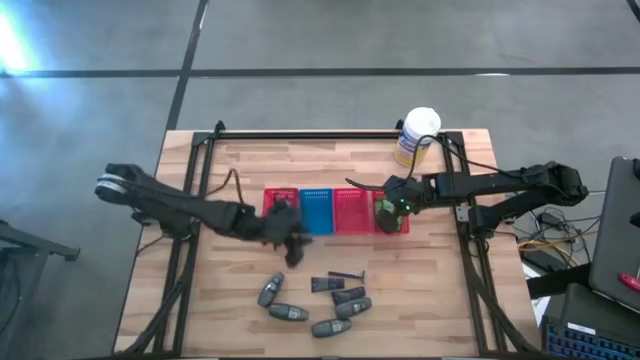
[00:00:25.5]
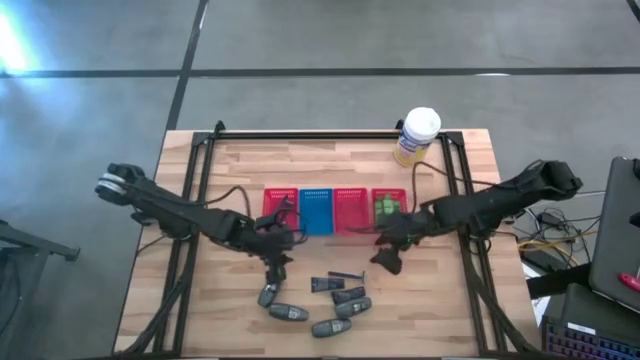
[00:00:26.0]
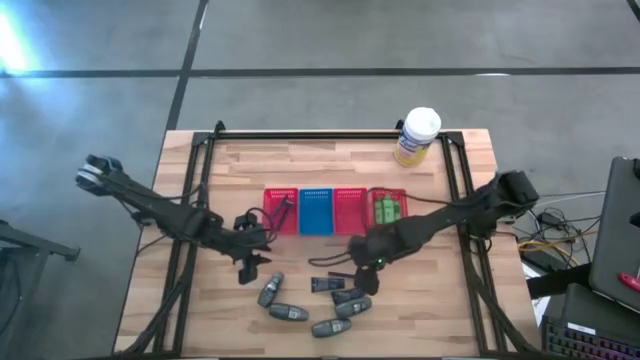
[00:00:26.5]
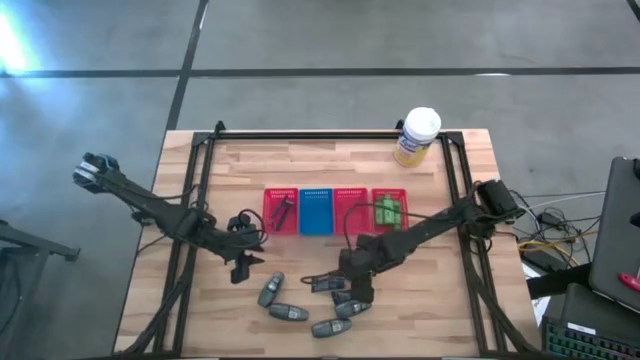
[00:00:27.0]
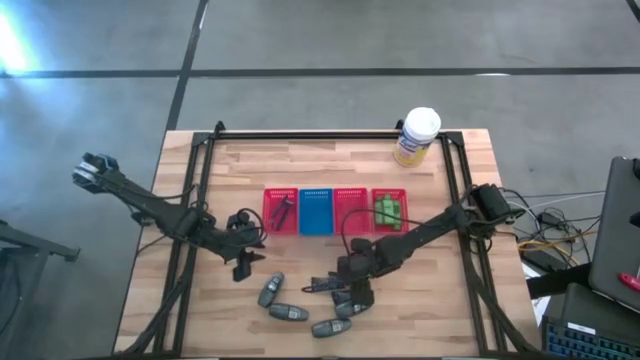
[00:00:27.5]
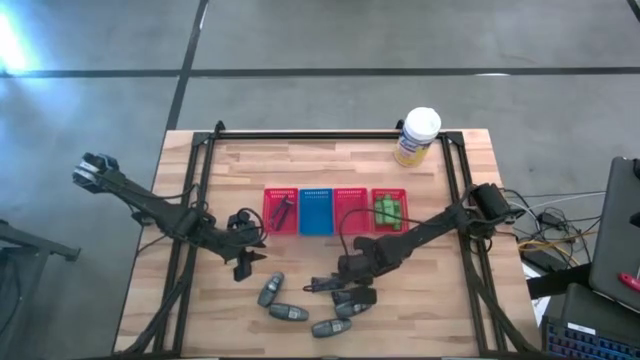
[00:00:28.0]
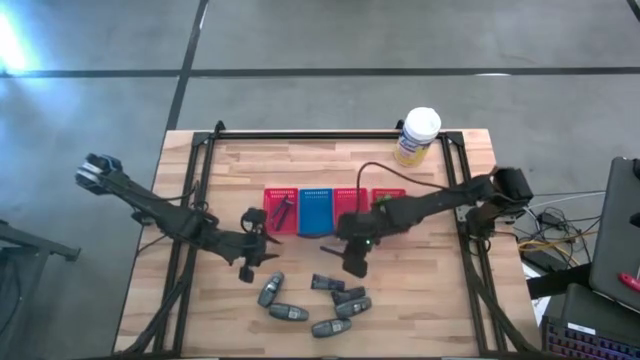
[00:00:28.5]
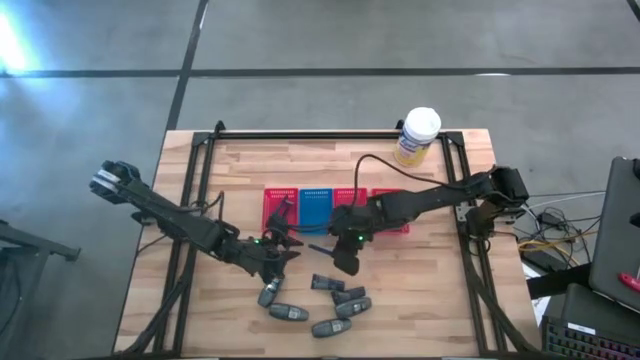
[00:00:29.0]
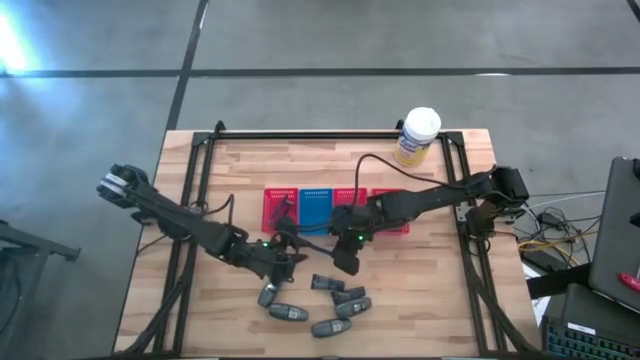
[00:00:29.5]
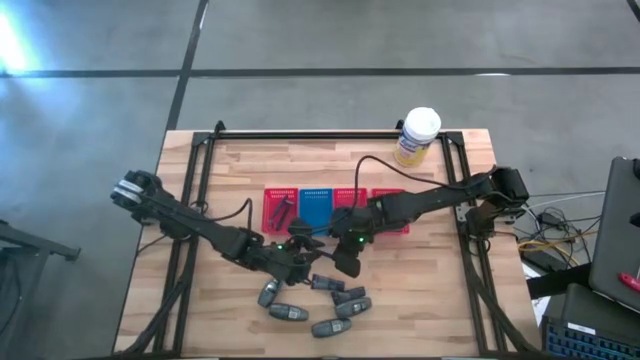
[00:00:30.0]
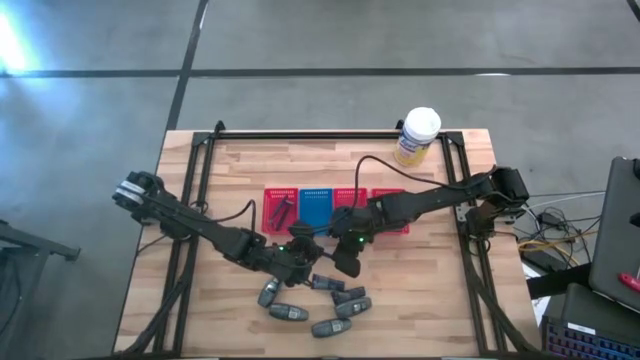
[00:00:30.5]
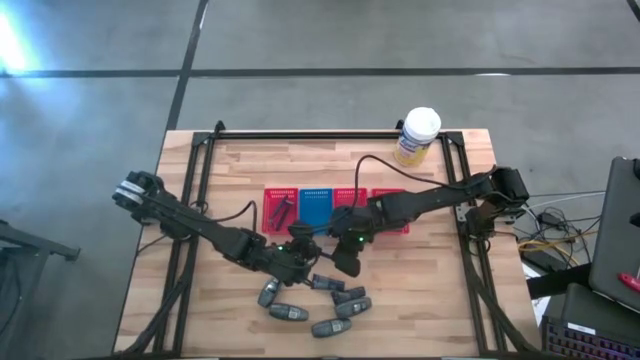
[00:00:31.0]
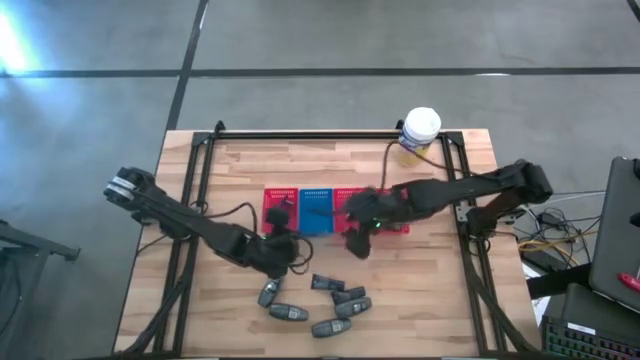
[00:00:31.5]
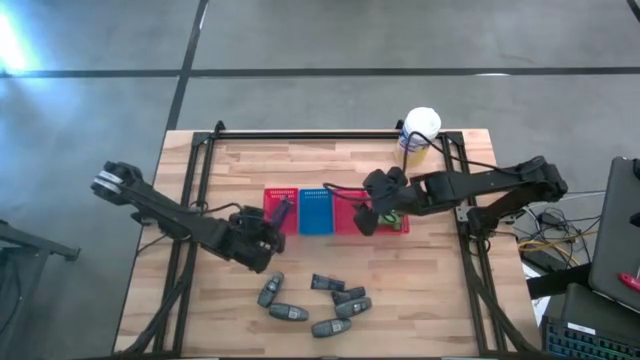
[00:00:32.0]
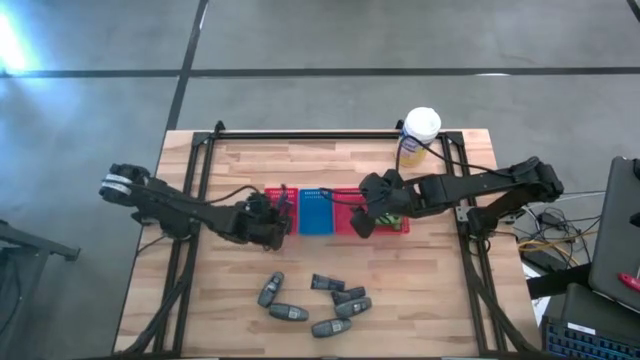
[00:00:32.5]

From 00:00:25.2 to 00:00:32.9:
Task: Pick & Place Travel size toiletries
Put the blue razor into the left red bin

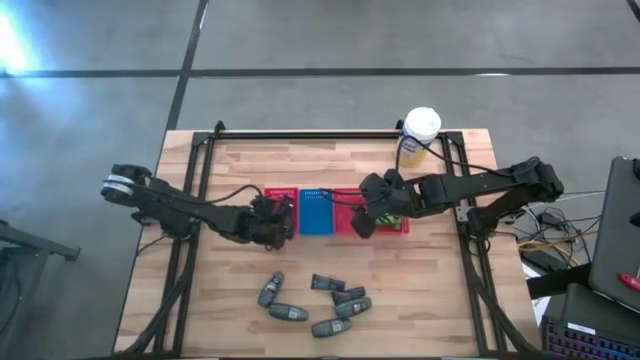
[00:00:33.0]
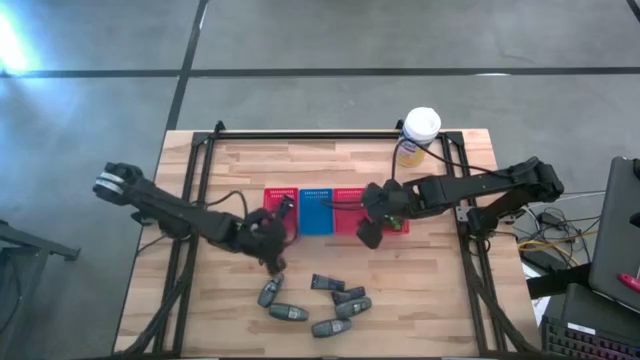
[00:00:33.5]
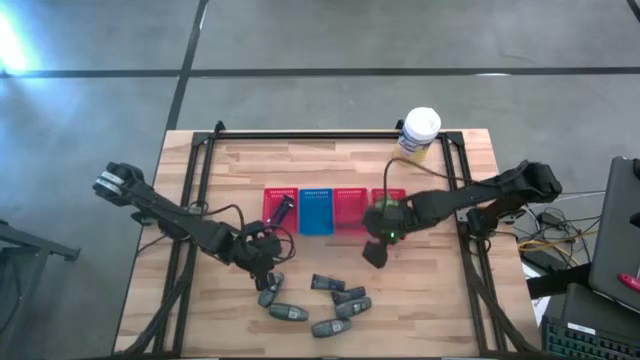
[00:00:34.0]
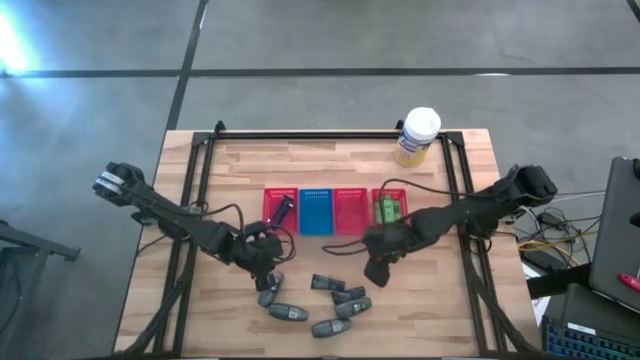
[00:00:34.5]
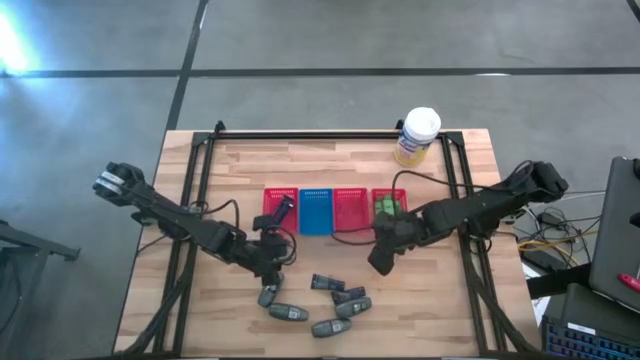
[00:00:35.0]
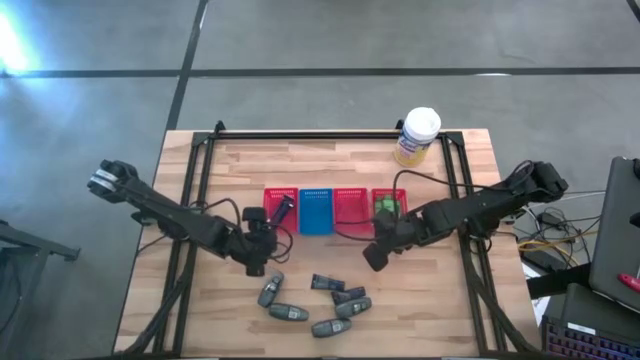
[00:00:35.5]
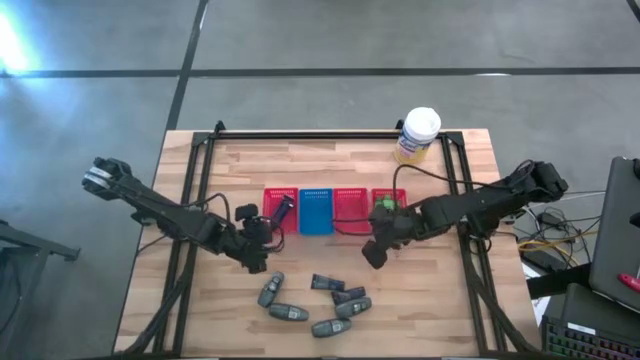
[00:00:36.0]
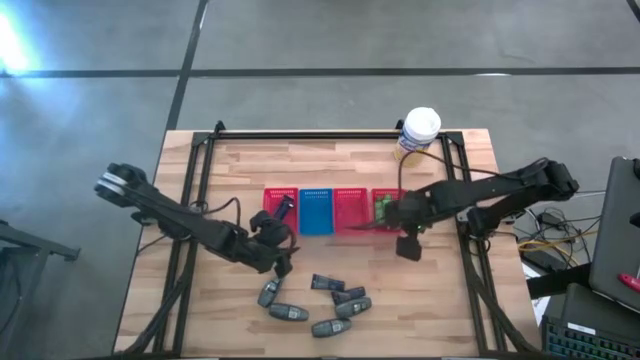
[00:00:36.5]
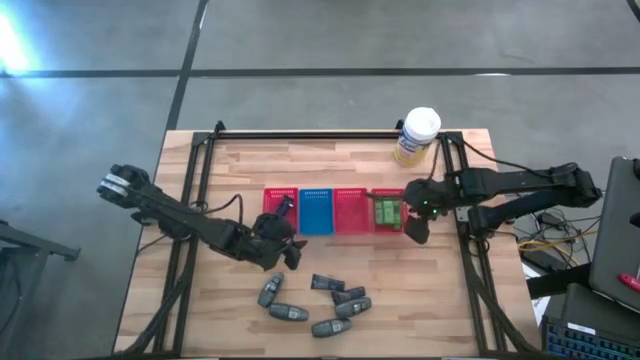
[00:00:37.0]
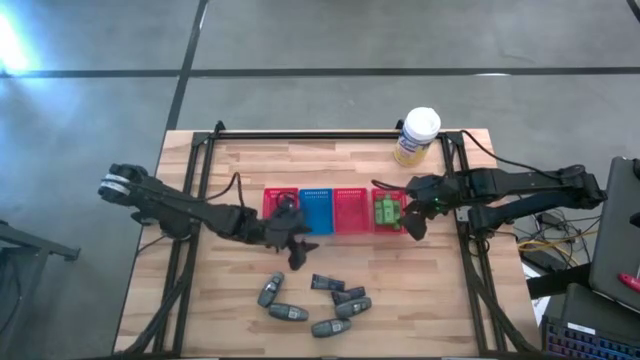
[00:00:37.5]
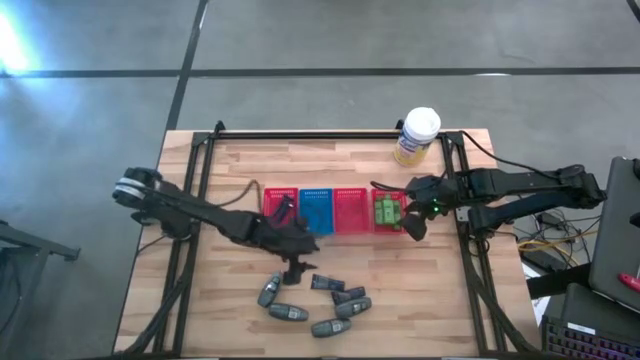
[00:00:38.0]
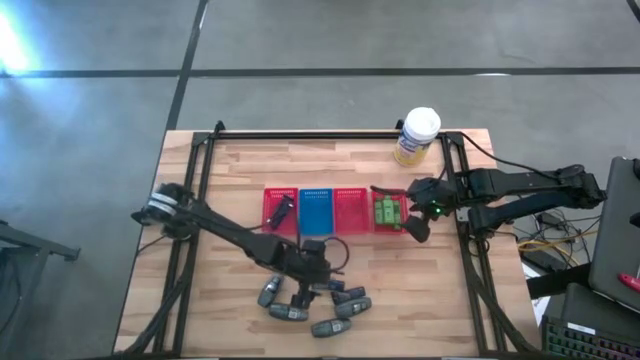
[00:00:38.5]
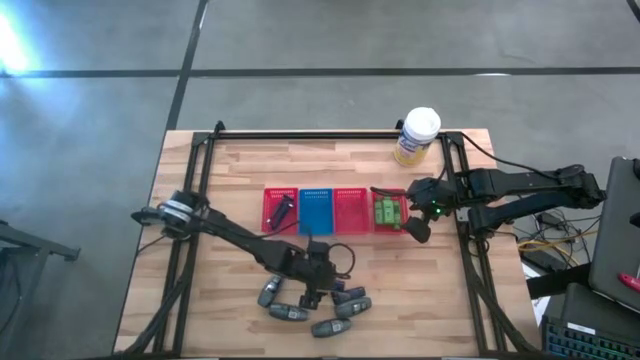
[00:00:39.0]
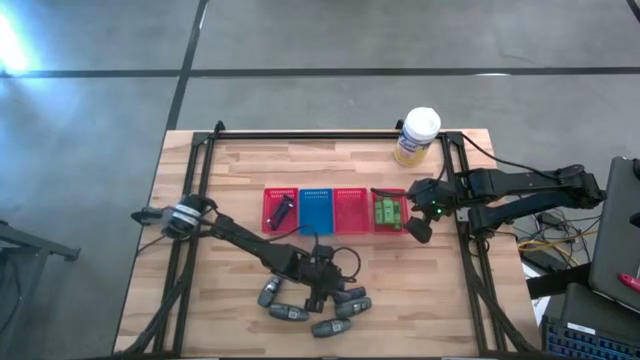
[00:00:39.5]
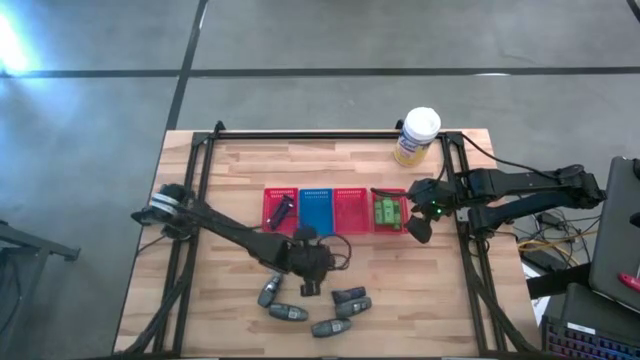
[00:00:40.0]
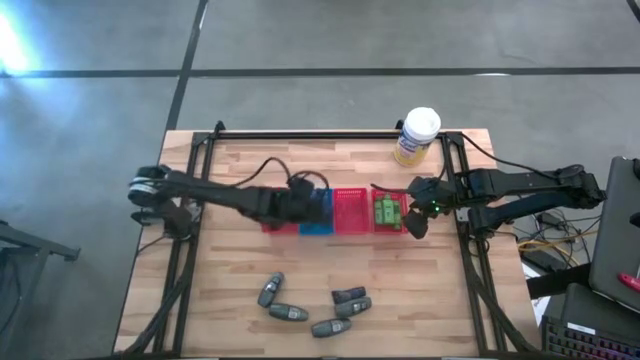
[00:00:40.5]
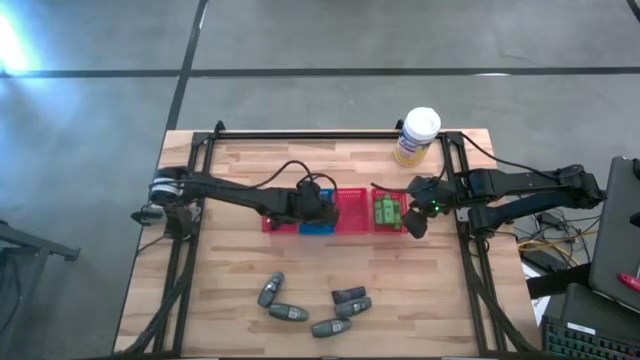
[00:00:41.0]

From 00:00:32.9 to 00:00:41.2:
Put the blue shave cream into the blue bin

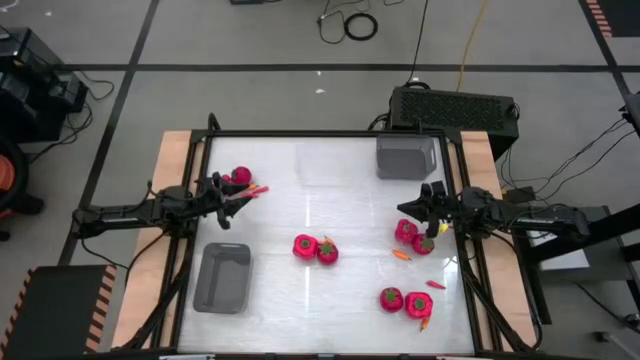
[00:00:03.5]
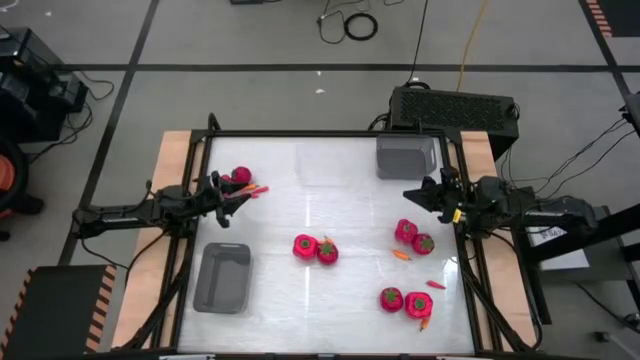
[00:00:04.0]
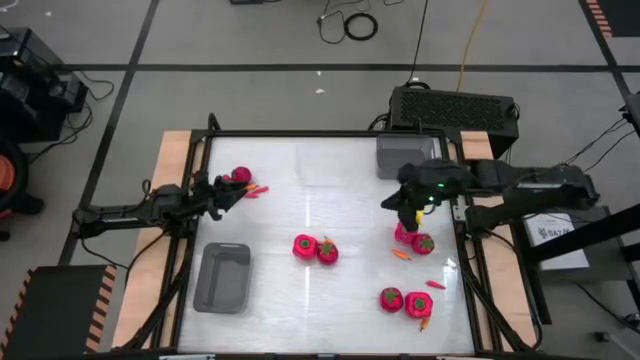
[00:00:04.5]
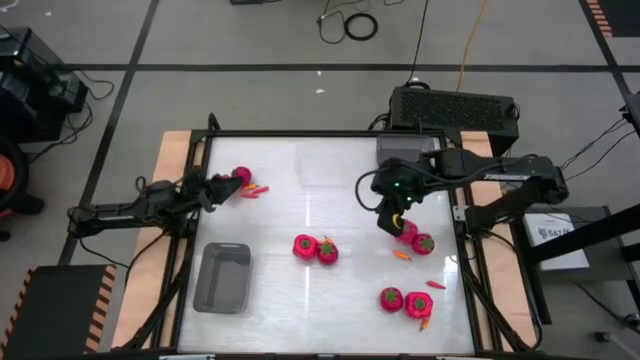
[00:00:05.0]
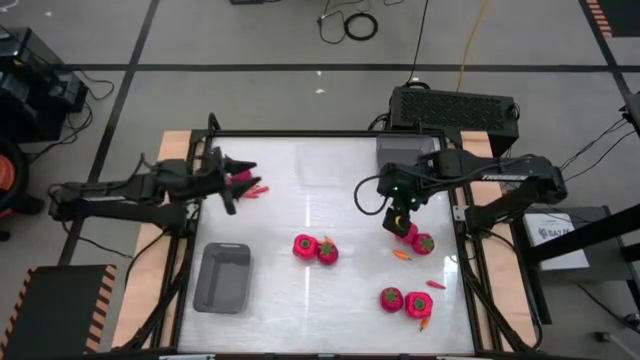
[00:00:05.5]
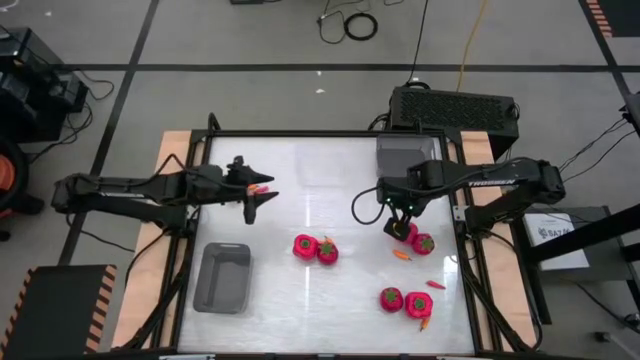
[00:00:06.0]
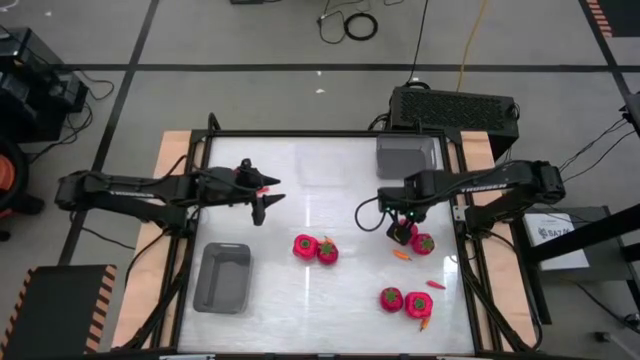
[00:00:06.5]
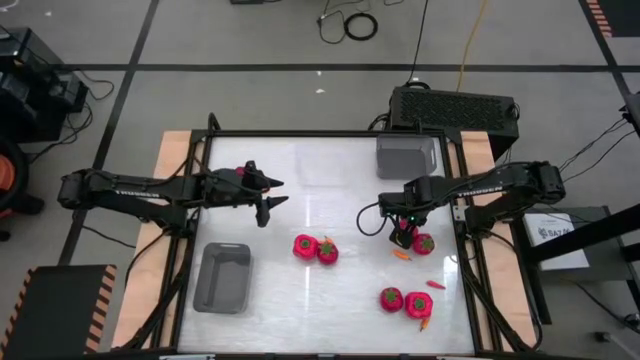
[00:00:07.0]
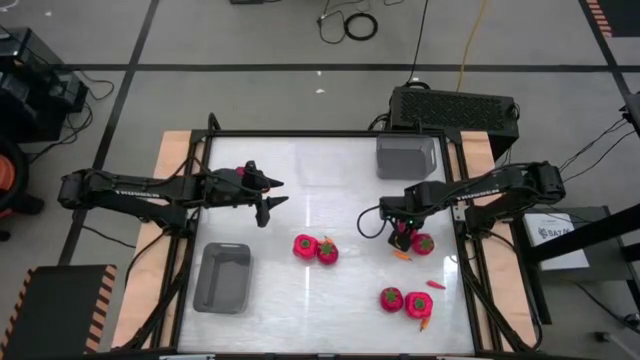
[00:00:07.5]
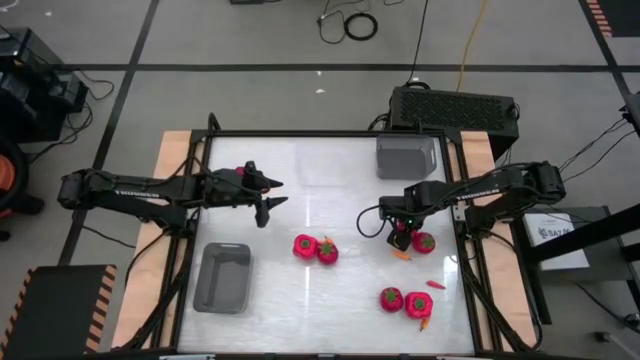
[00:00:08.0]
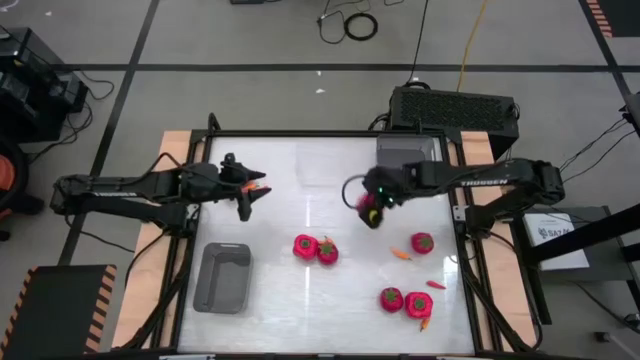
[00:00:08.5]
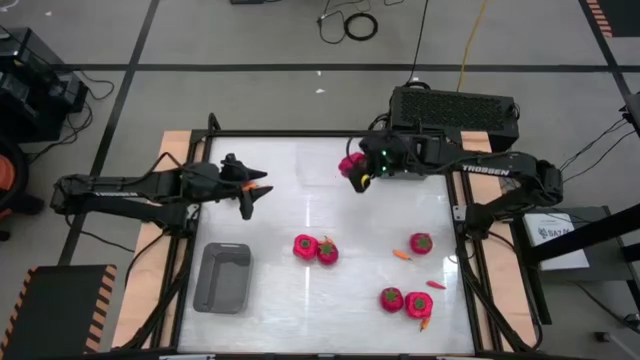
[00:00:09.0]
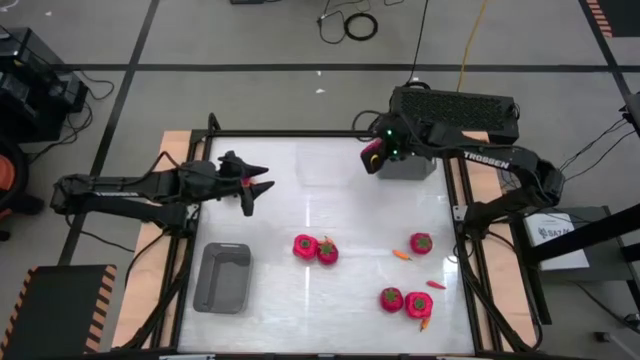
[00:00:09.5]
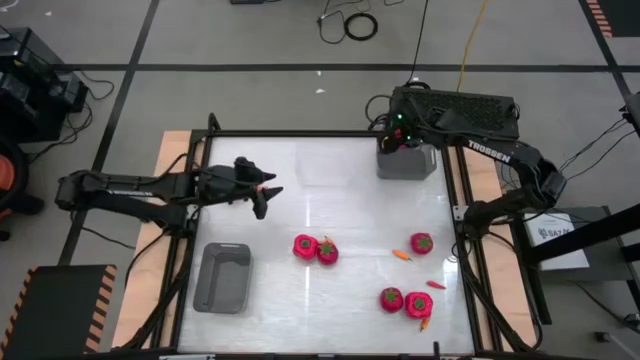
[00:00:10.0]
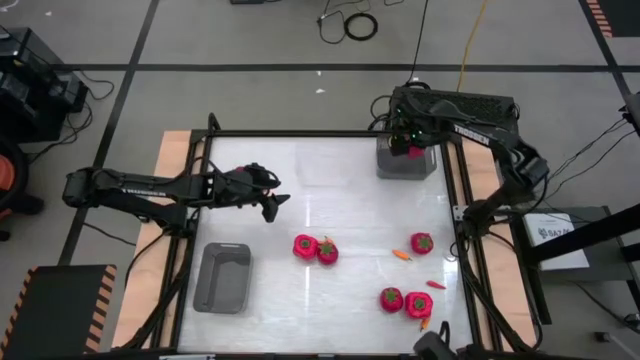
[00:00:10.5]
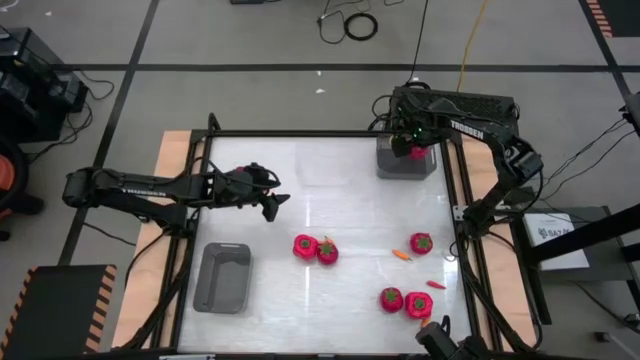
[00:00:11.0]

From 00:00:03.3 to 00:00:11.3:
Task: Sort produce into baskets
Put the red bell pepper into the top gray bin
